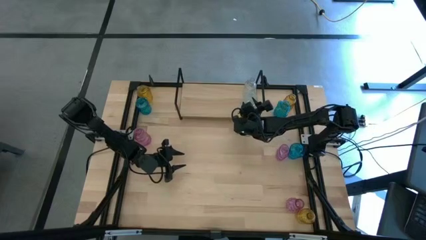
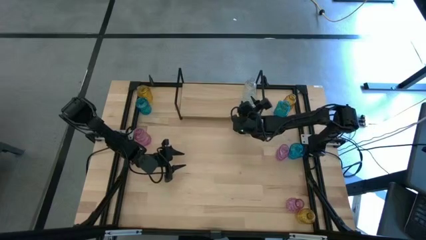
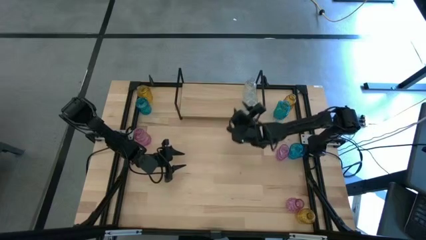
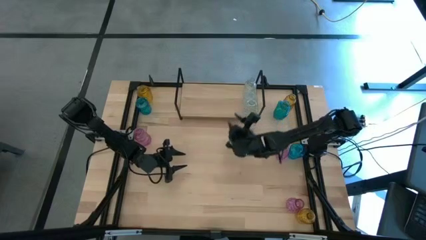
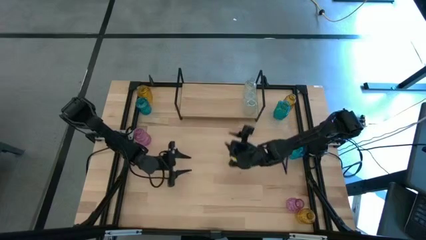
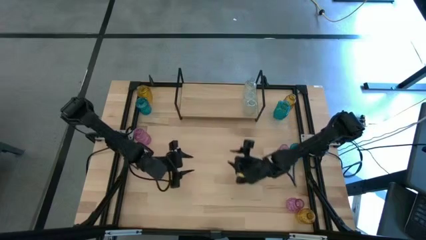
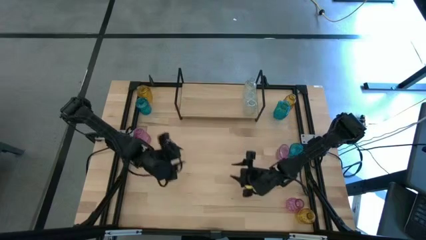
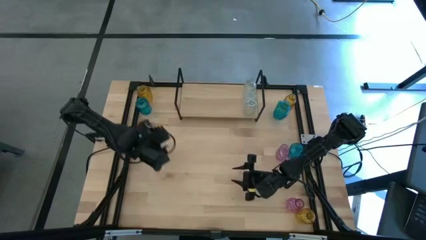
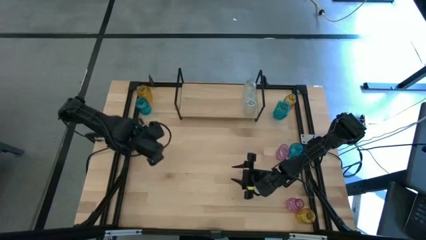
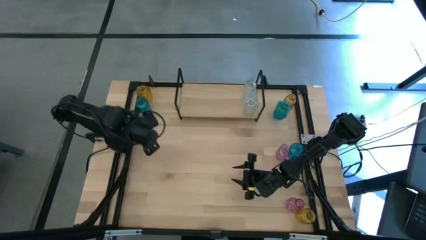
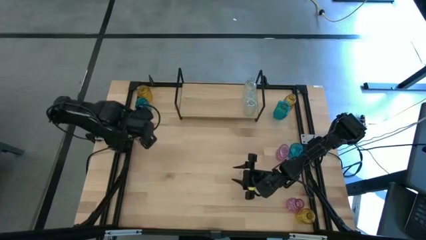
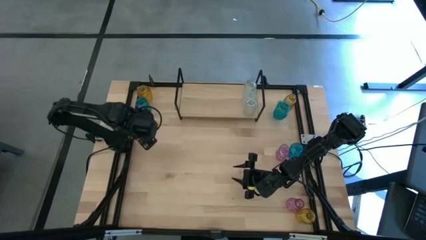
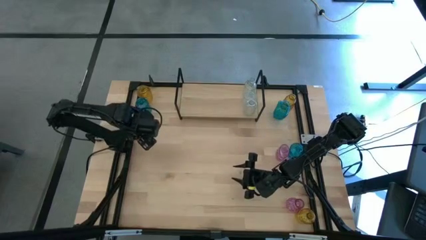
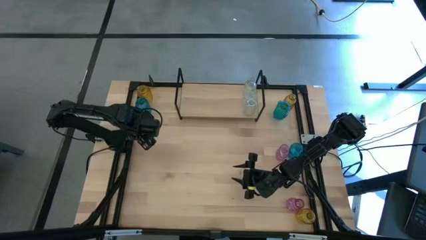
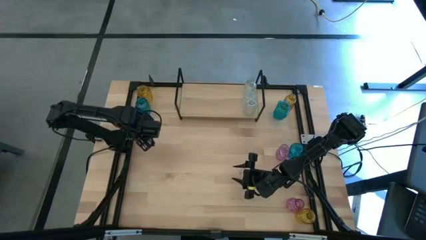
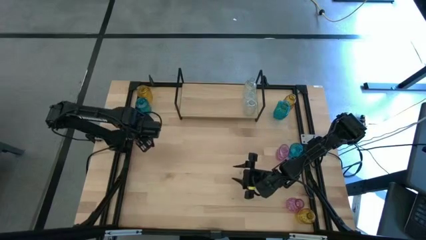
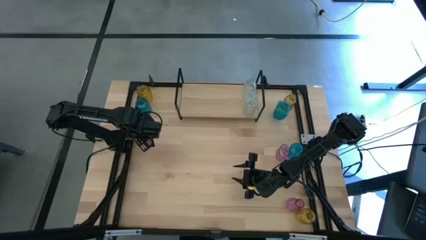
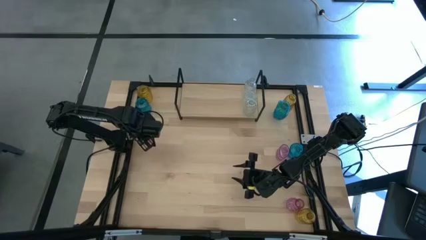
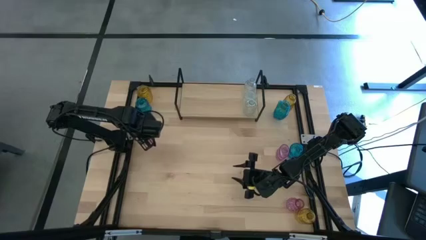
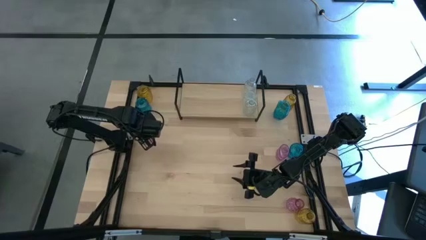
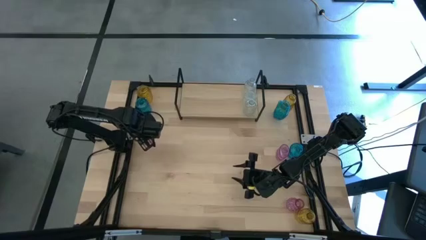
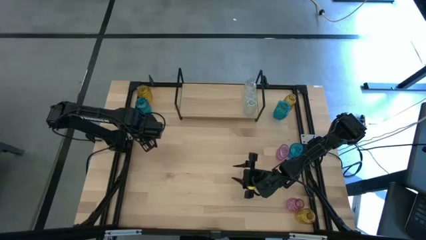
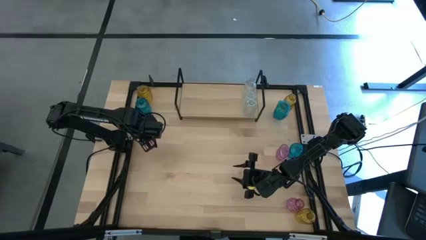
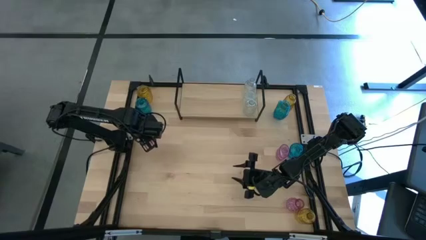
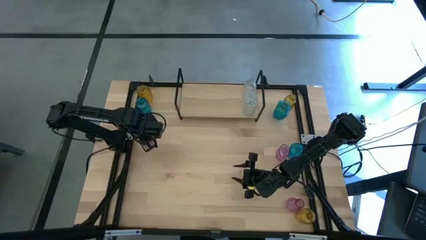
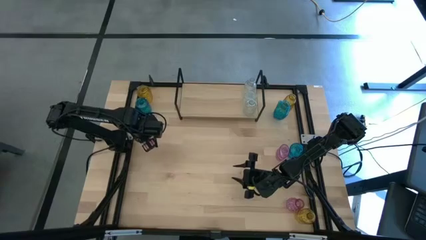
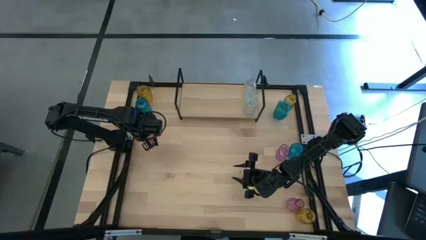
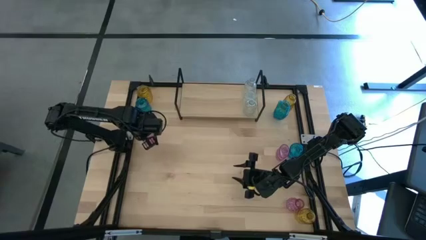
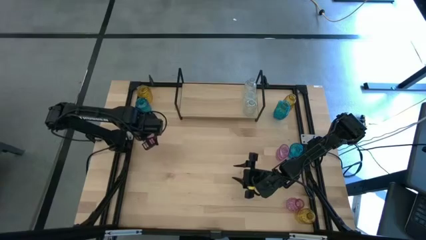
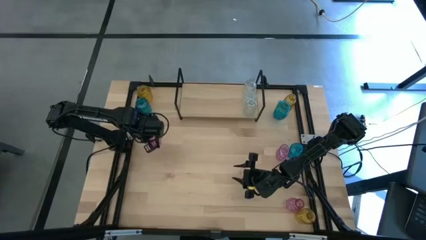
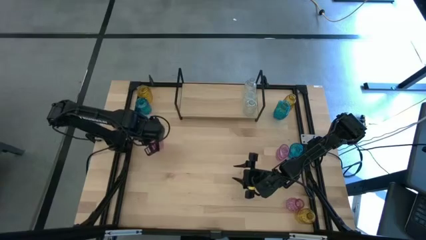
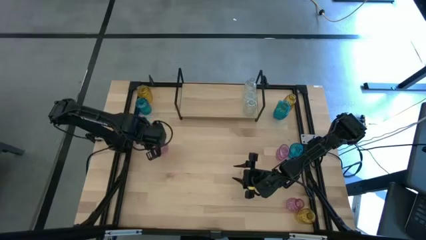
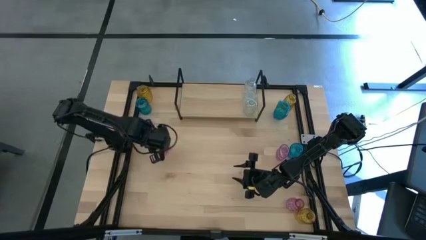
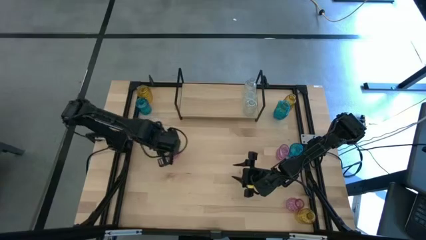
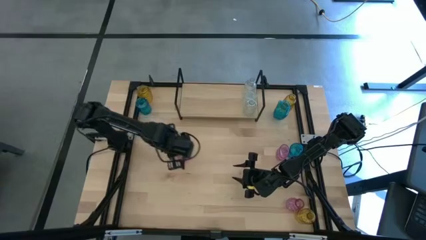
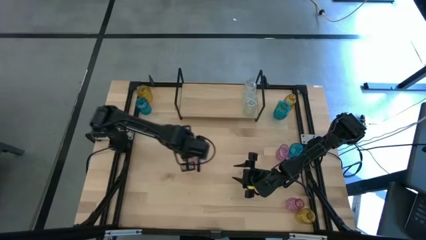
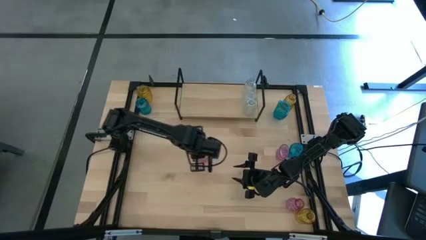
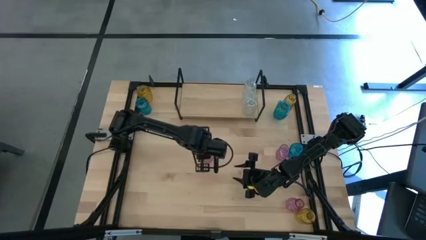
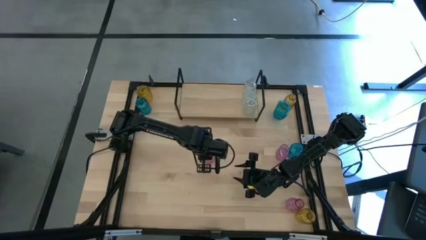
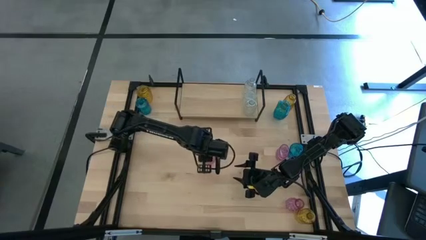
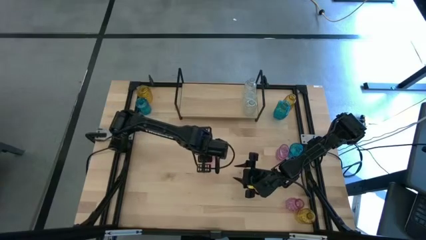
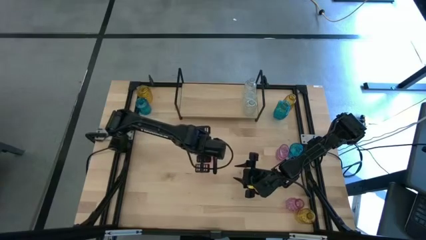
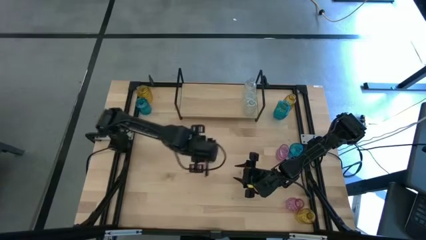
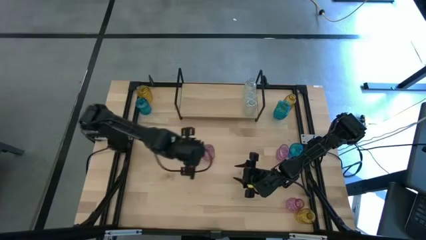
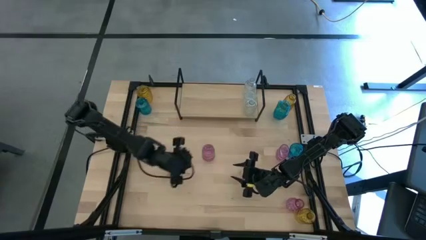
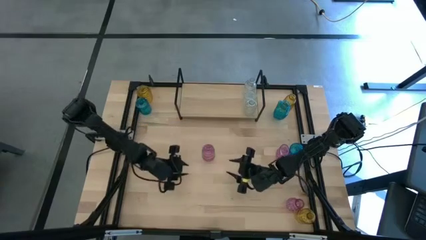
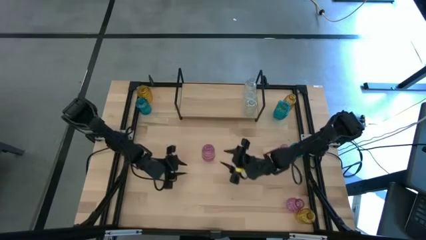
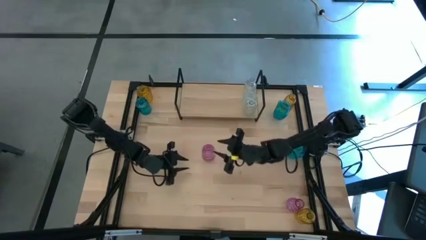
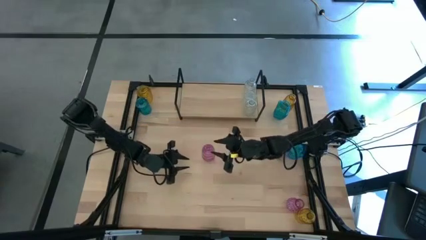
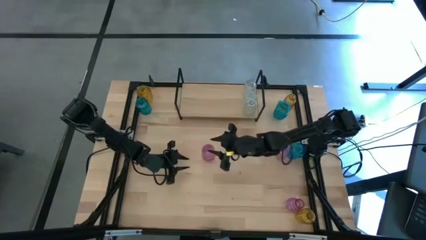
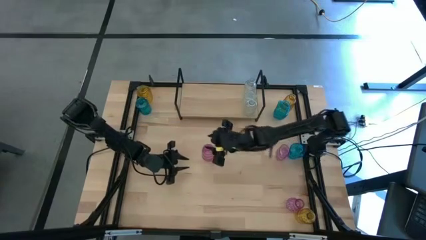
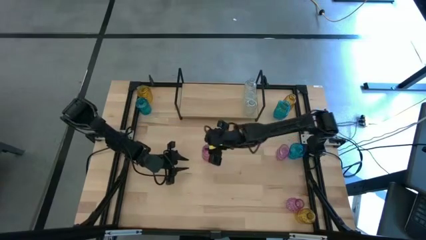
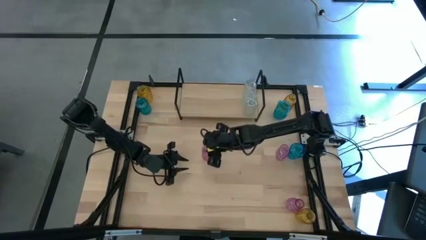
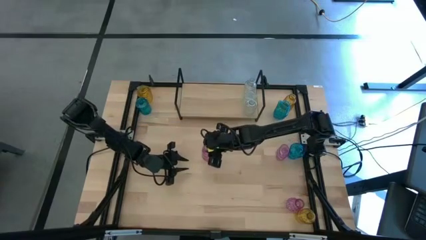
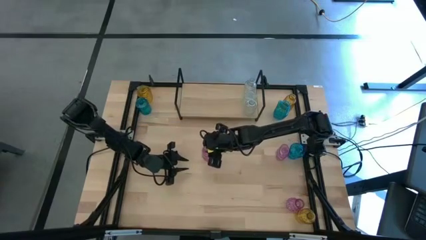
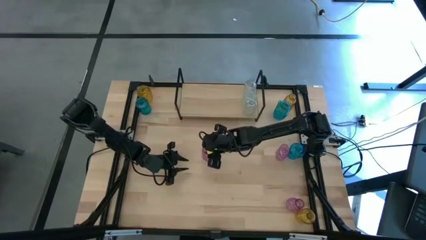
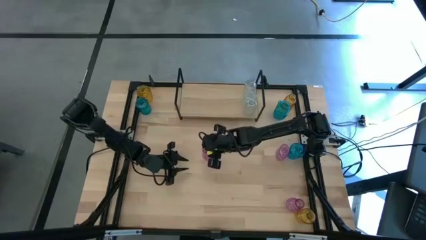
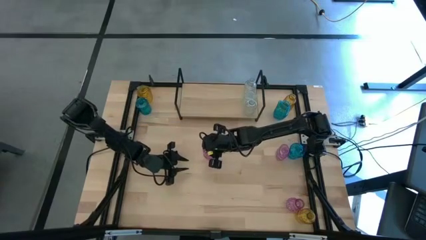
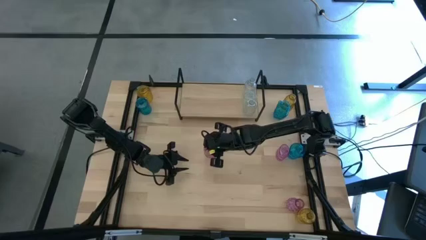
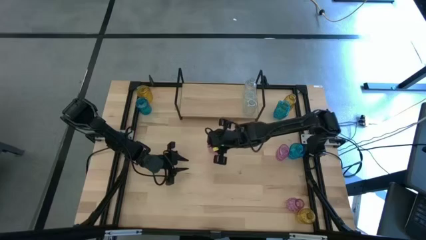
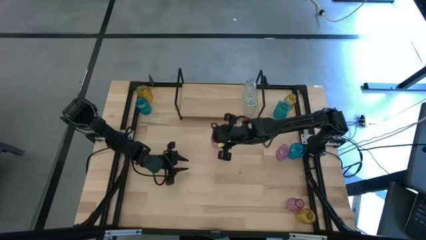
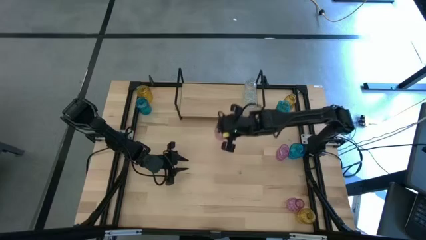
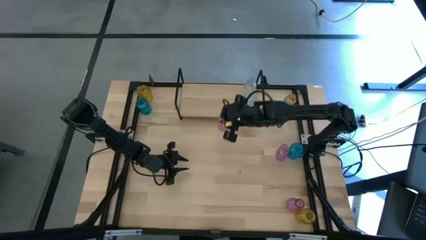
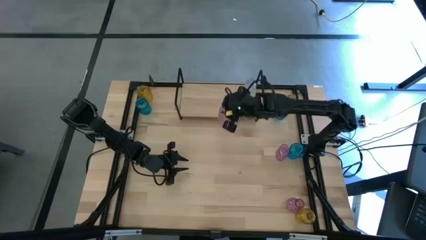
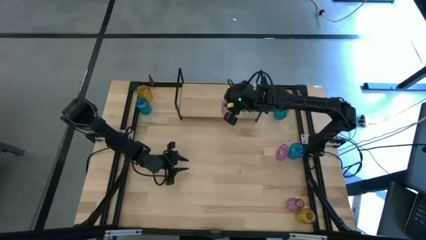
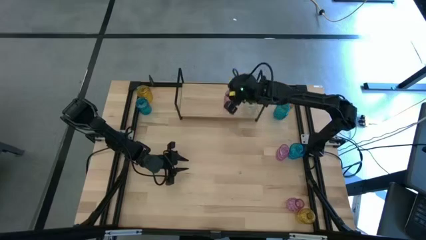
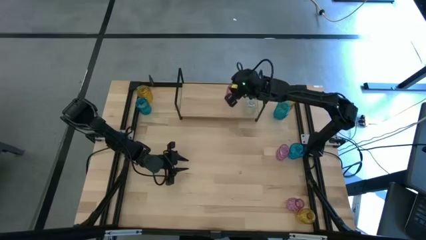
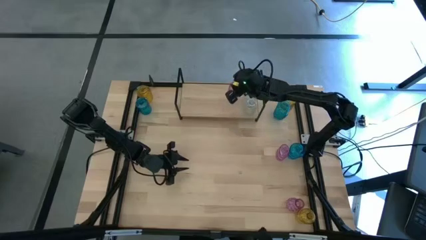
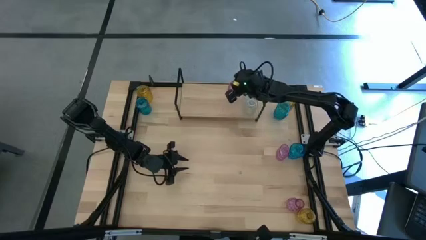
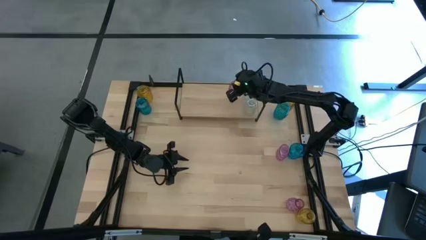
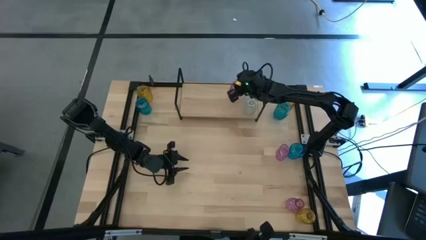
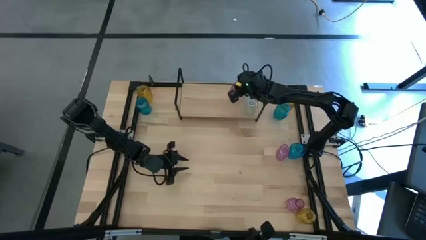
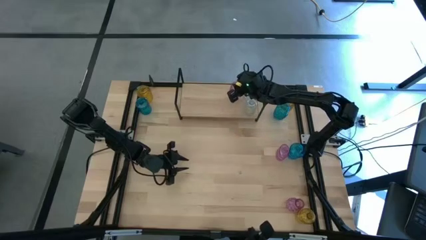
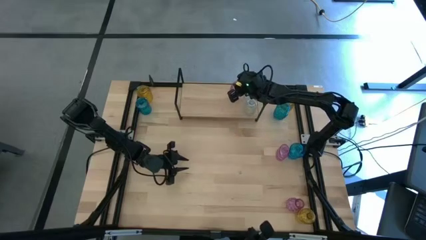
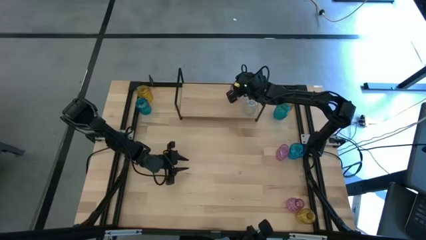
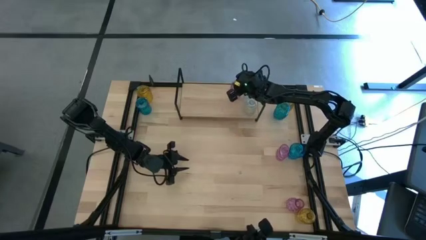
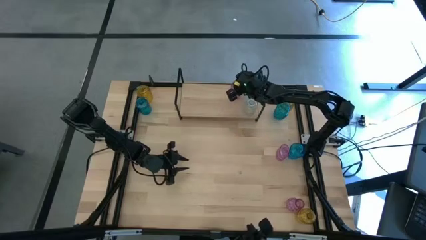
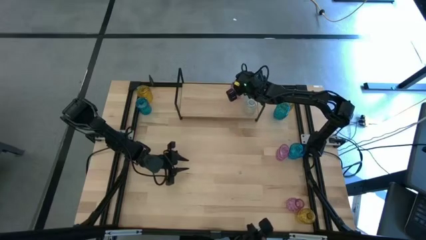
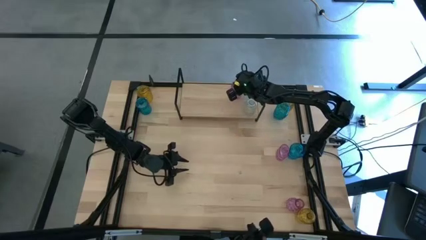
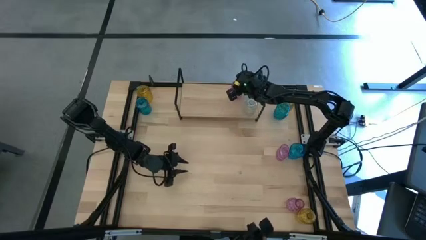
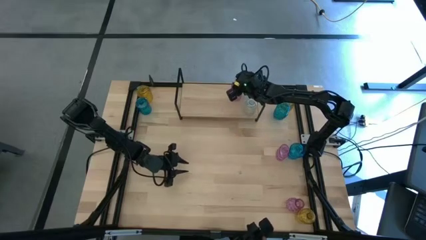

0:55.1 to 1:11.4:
Task: sort vases onto shelf
Put the left pink vase on the shelf
